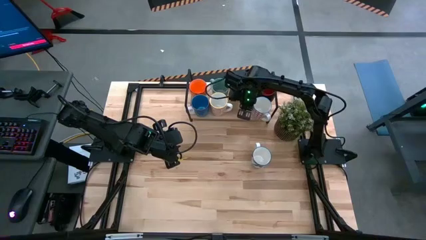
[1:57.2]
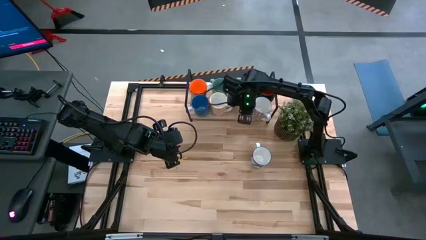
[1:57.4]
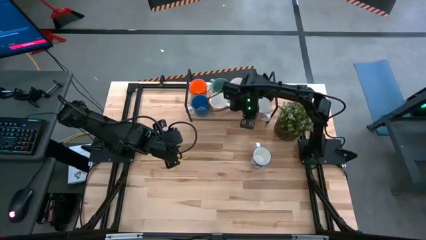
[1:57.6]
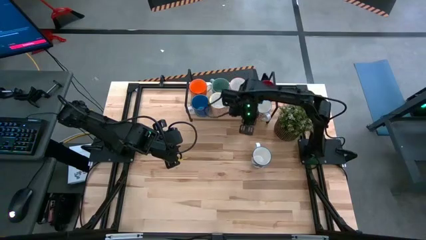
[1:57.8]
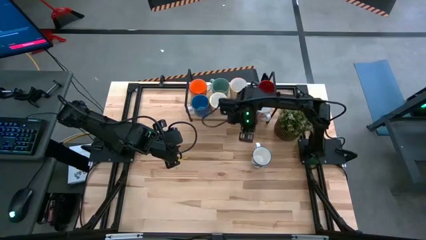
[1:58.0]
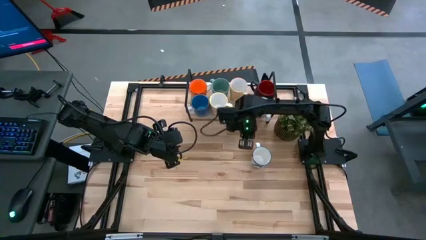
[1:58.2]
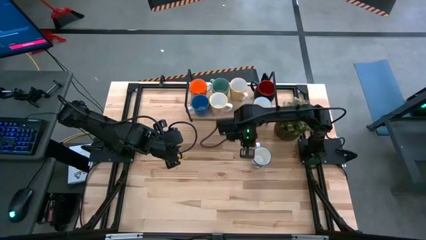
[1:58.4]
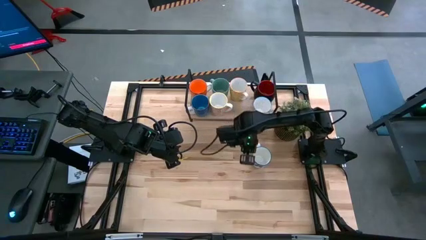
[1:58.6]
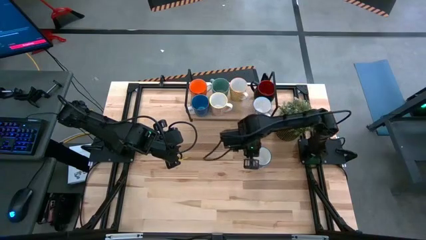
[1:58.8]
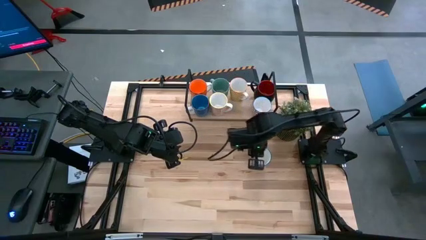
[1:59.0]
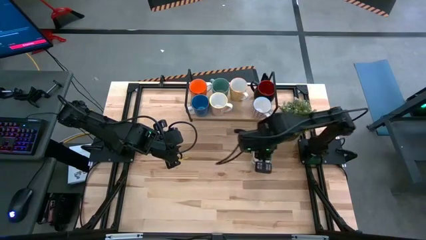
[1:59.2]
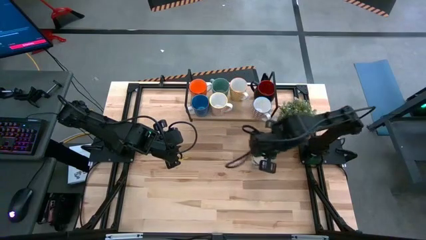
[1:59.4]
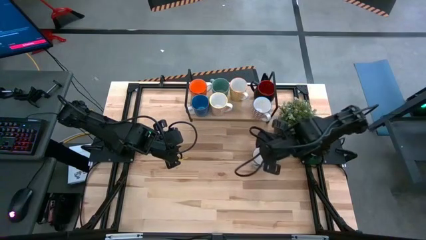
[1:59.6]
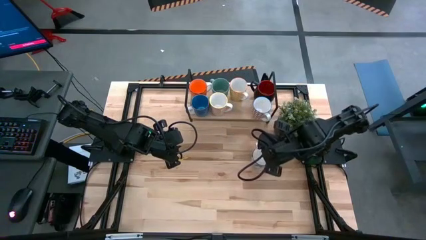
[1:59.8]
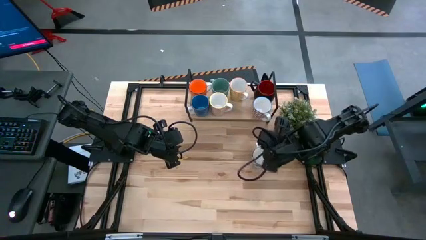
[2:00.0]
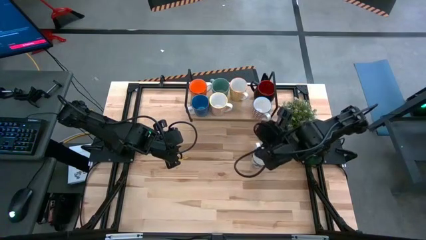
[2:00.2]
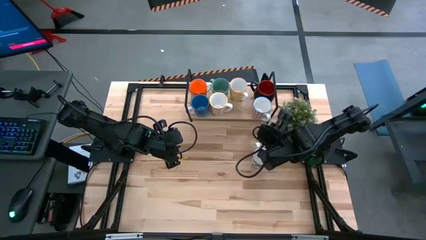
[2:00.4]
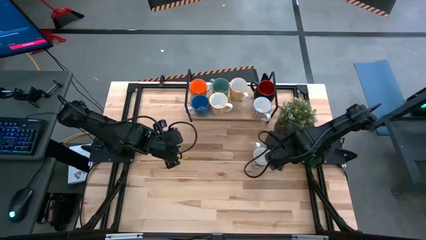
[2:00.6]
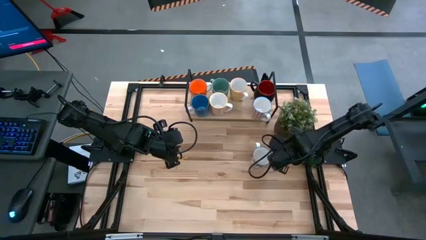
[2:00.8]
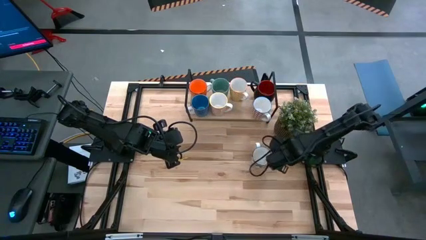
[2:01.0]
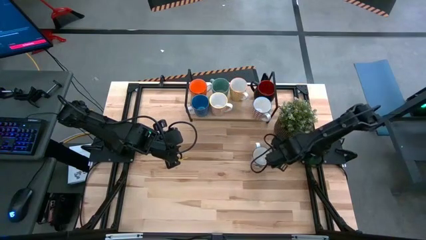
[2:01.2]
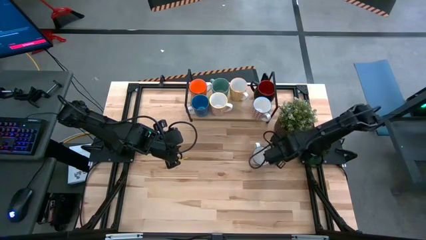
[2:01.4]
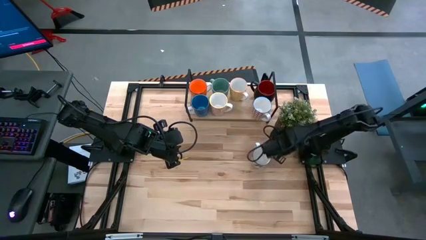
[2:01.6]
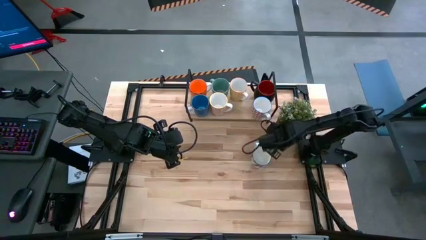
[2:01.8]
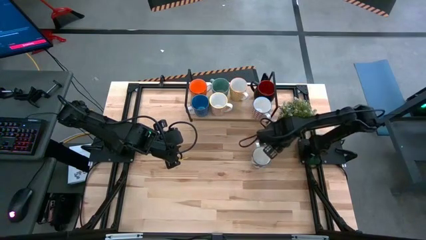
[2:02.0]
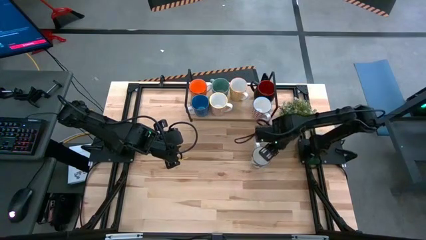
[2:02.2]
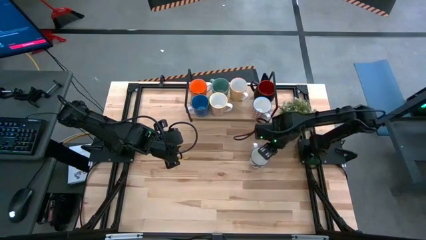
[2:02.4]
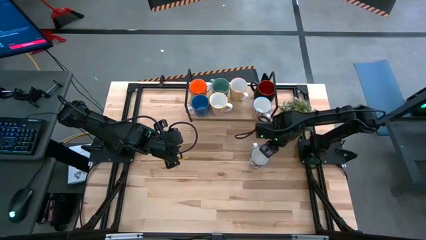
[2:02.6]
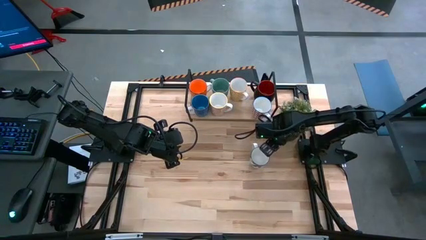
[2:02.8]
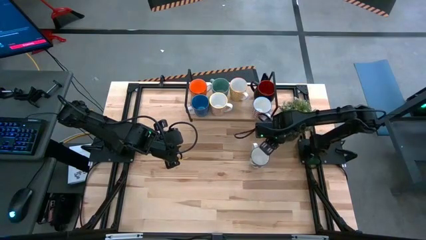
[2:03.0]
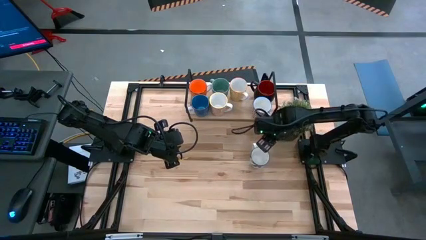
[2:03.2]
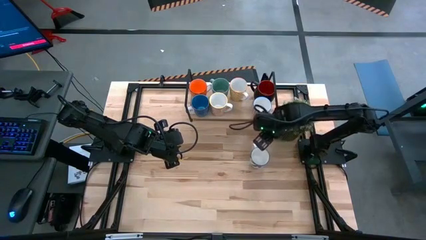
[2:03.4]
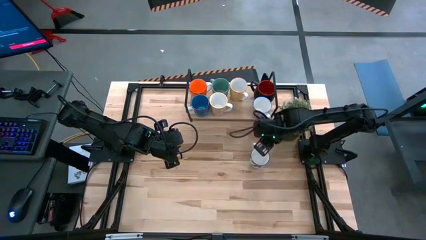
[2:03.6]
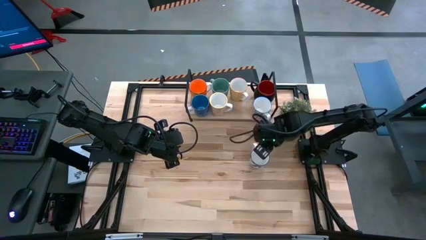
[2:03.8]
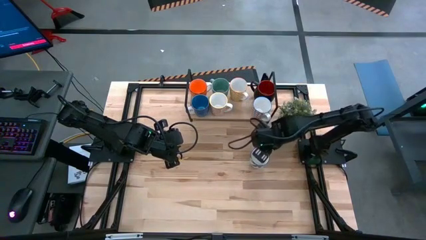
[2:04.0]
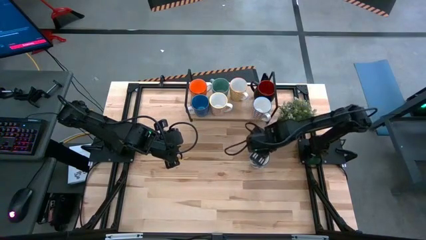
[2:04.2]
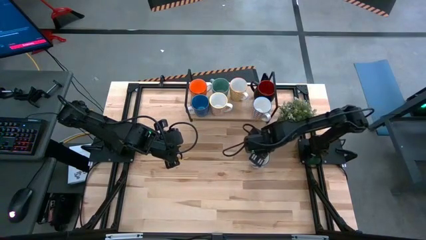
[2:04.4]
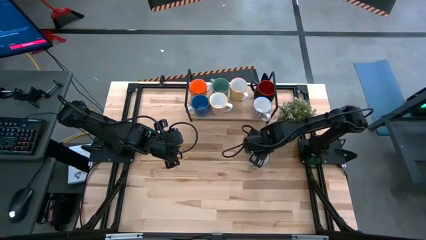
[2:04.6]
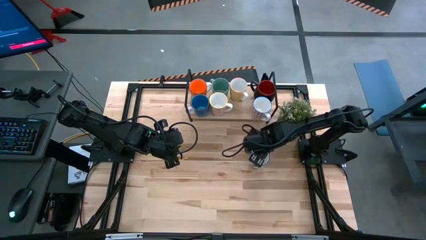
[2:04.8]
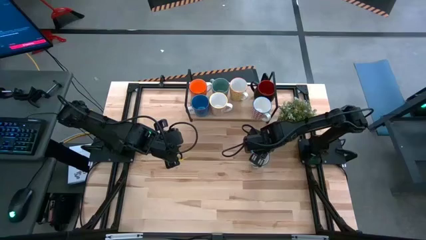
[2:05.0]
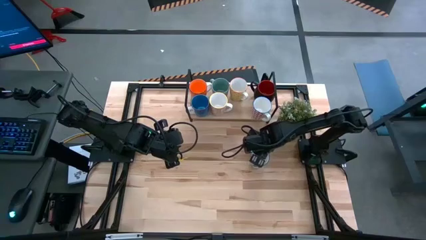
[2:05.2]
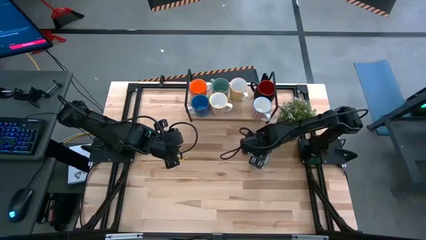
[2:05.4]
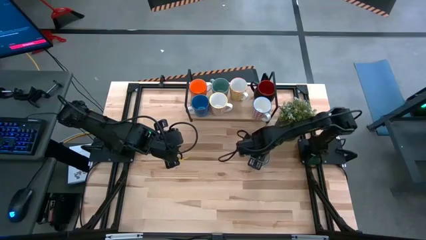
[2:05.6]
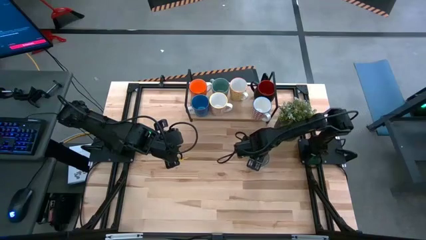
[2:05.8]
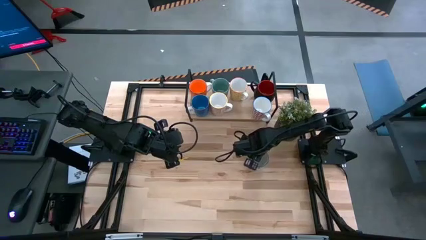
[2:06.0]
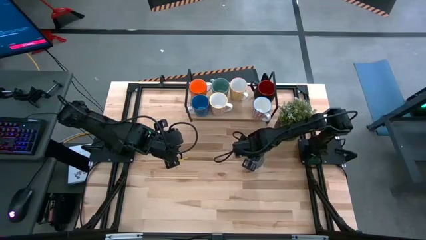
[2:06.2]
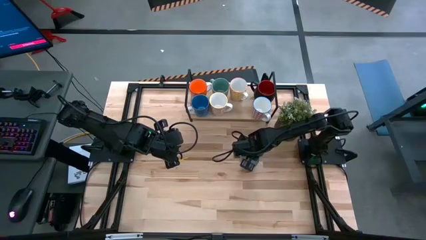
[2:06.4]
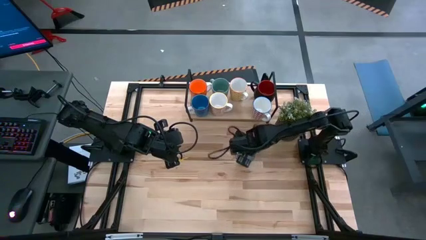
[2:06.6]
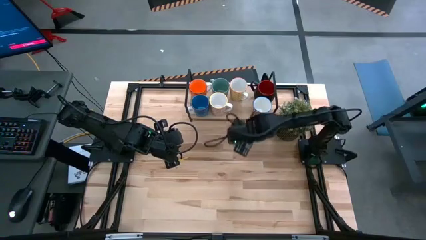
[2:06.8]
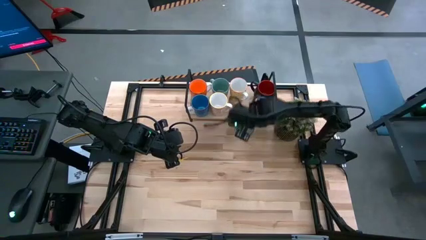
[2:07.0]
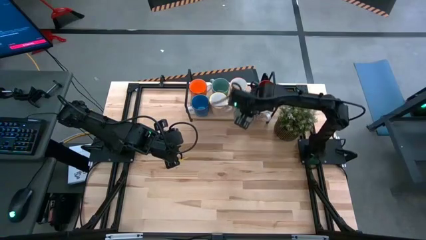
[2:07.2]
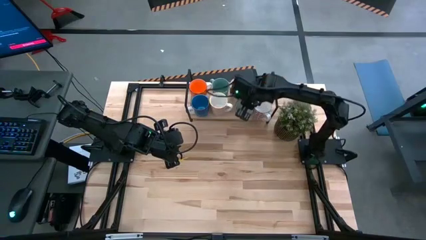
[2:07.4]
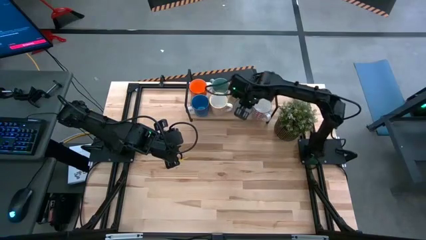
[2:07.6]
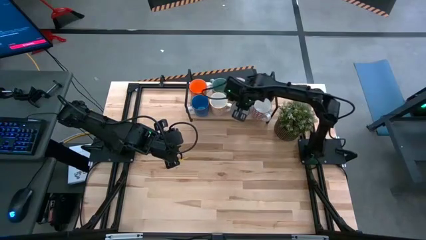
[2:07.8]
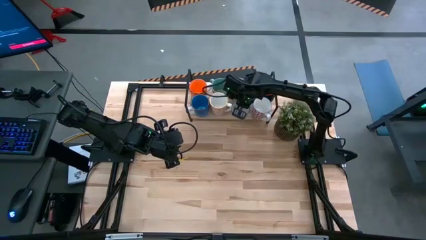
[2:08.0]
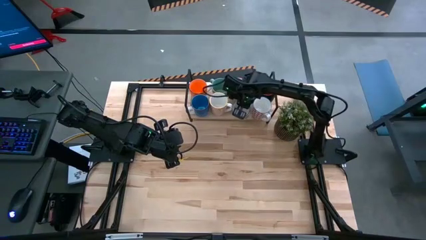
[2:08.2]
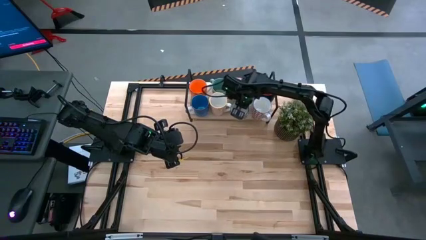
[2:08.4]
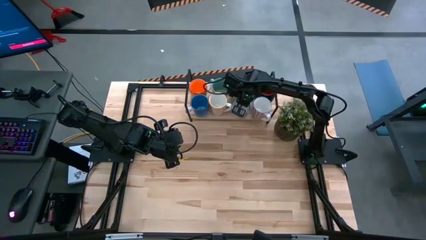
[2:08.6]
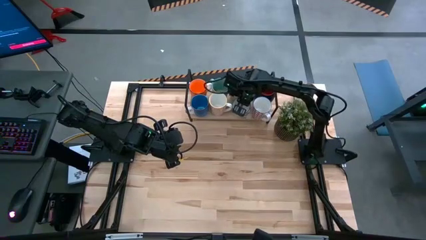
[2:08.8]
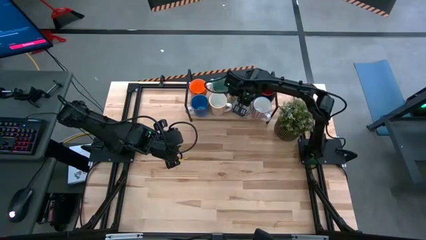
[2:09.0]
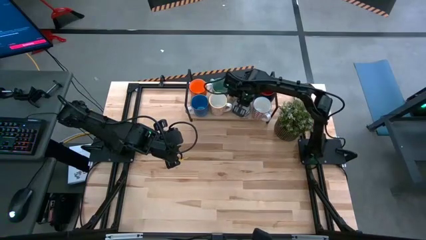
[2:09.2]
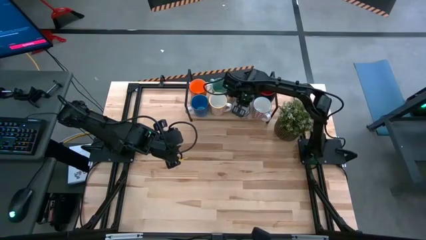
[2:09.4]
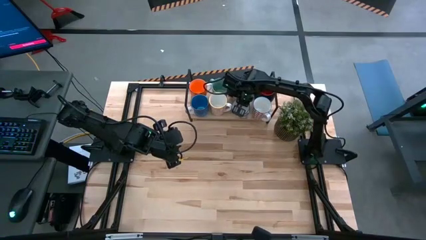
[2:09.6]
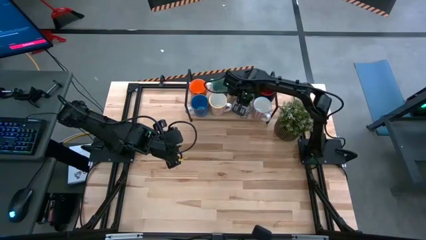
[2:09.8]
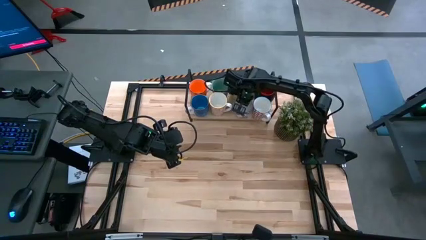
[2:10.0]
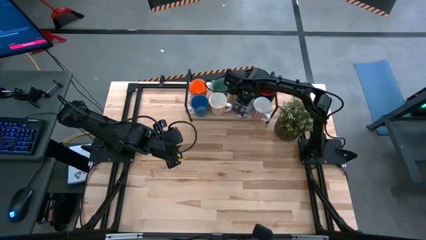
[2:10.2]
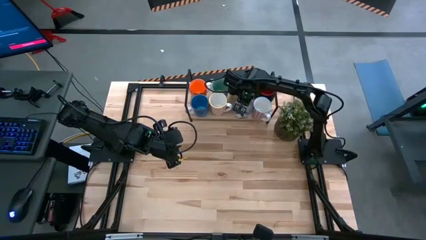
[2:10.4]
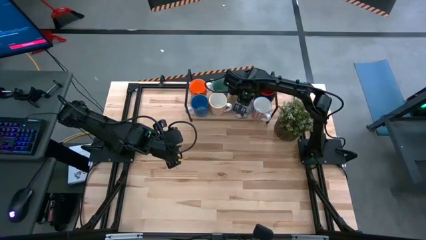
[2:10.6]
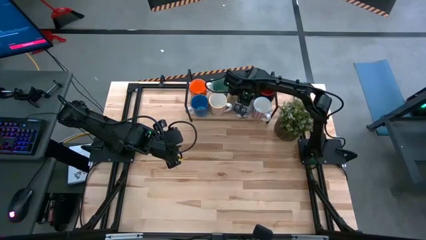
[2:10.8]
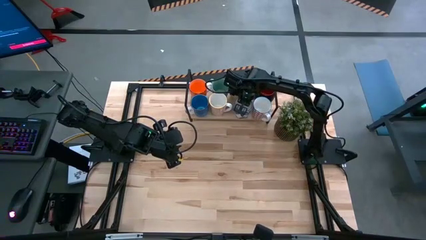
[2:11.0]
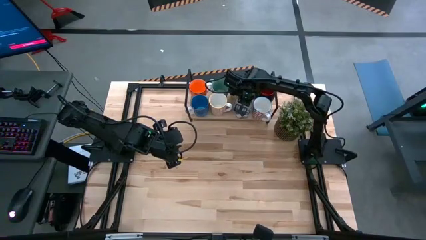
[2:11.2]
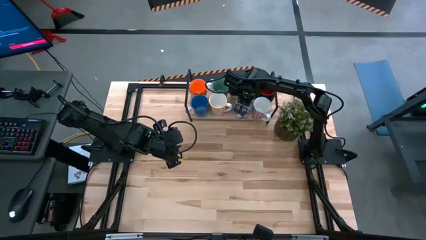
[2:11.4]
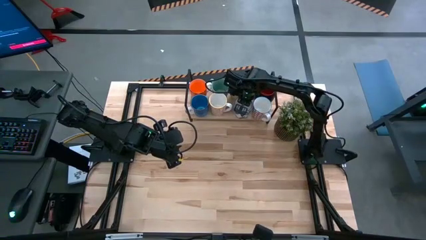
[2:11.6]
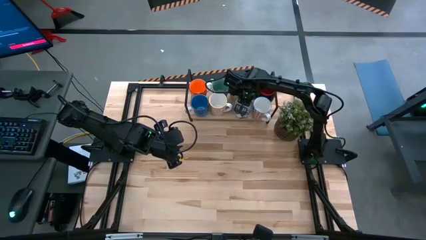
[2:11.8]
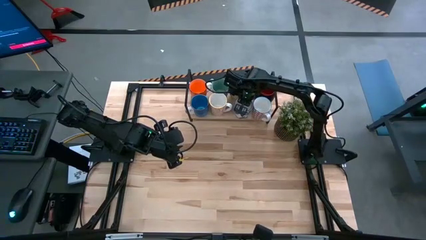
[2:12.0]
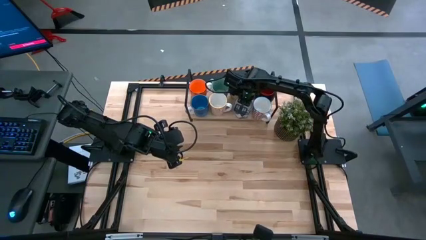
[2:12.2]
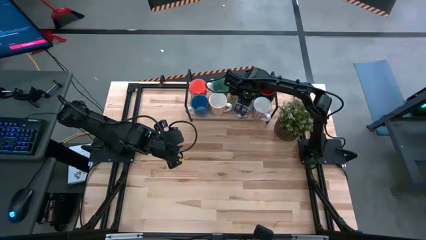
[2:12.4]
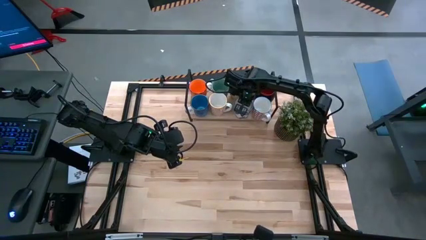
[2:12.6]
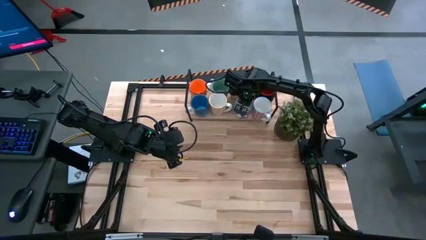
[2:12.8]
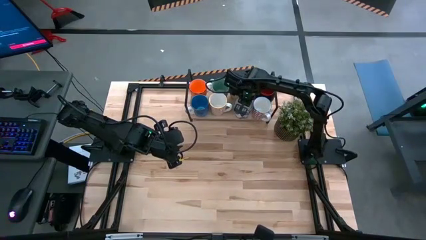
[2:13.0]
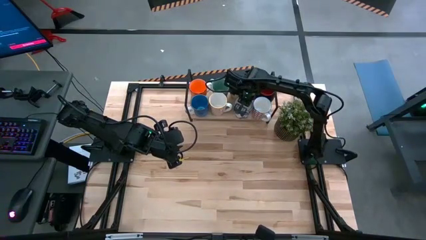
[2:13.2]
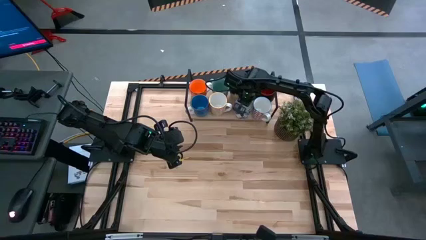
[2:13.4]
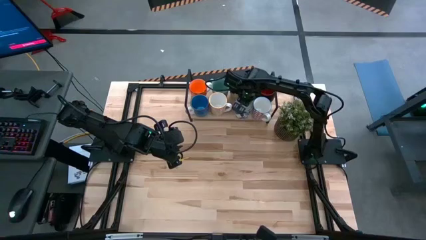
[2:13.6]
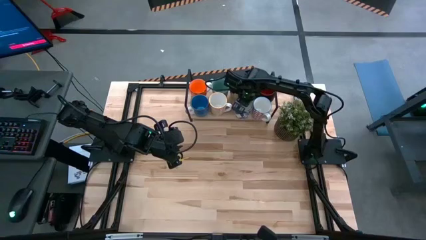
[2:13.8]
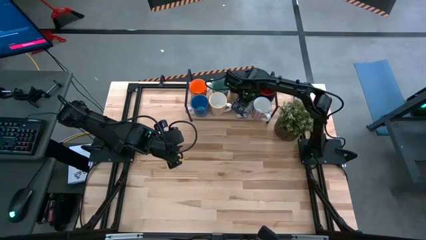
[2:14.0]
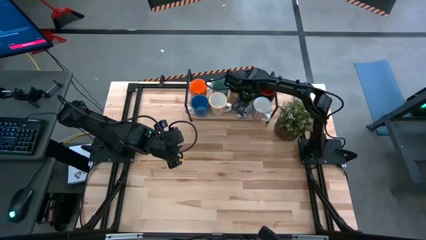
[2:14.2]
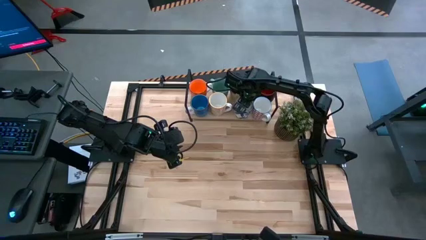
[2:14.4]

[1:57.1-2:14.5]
Task: Place coffee mugs
Put the blue patterned mug on the shelf
